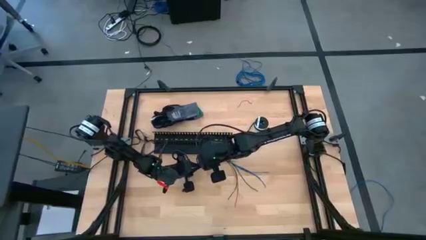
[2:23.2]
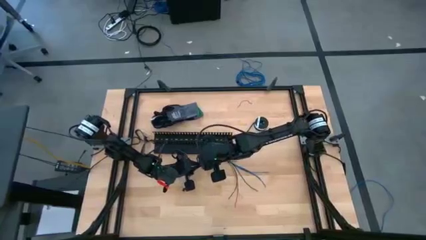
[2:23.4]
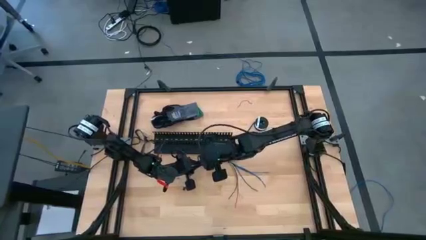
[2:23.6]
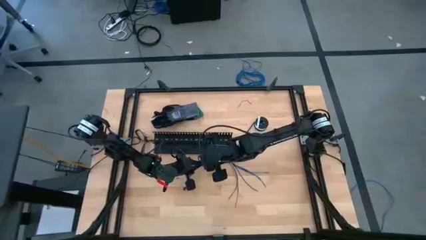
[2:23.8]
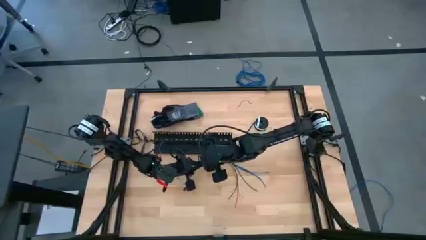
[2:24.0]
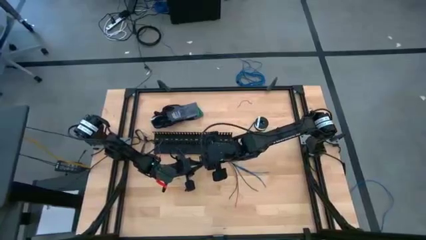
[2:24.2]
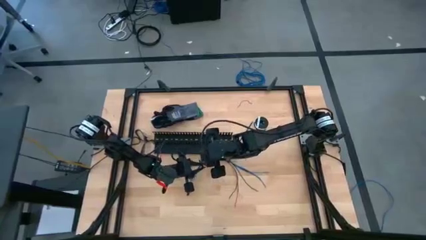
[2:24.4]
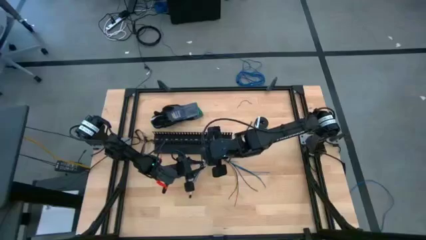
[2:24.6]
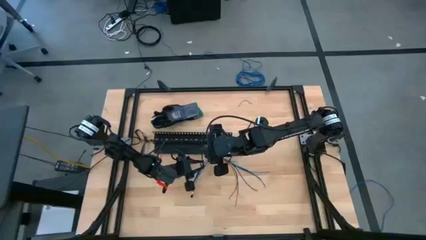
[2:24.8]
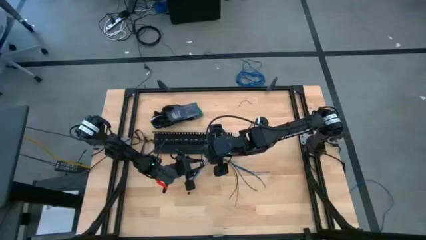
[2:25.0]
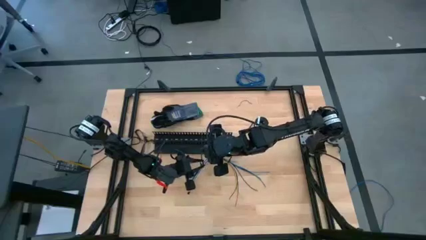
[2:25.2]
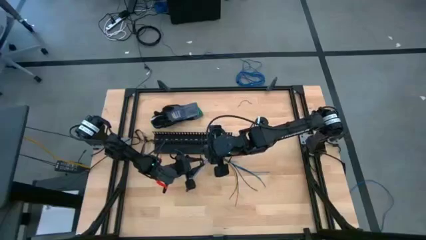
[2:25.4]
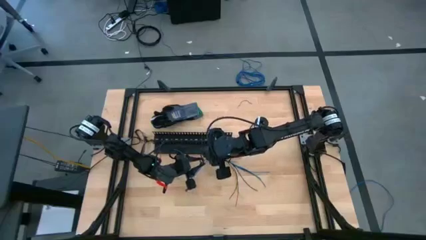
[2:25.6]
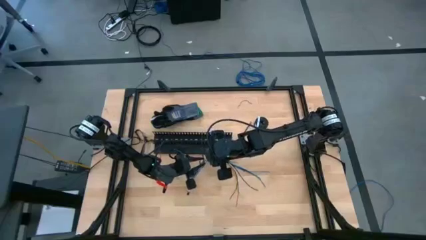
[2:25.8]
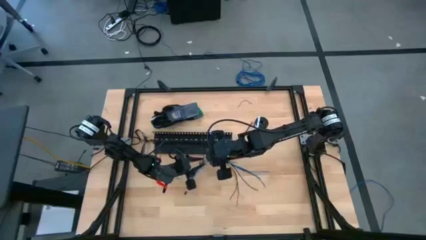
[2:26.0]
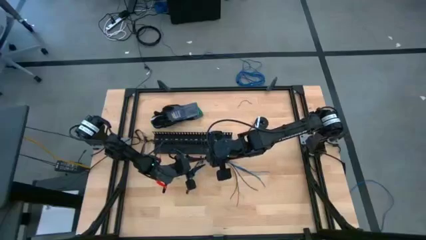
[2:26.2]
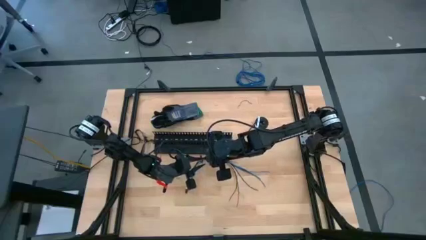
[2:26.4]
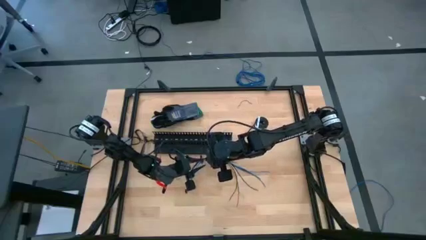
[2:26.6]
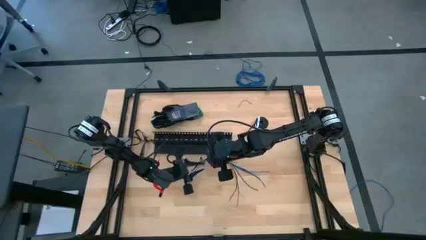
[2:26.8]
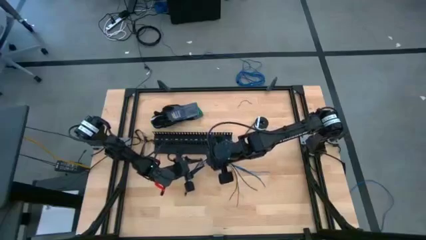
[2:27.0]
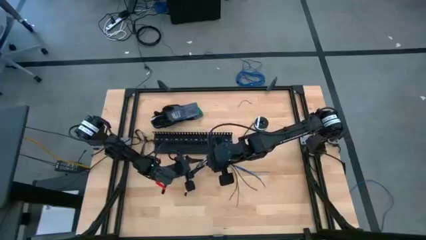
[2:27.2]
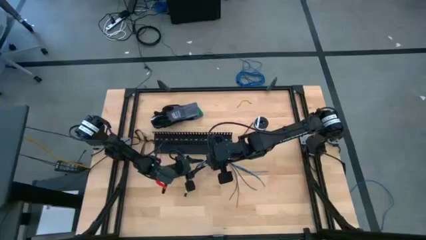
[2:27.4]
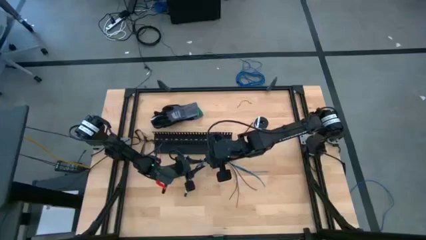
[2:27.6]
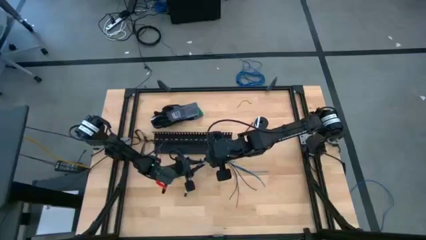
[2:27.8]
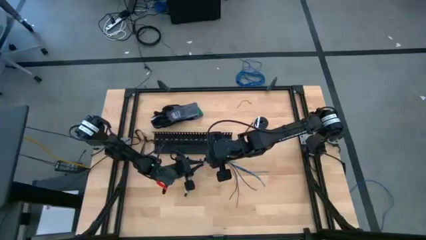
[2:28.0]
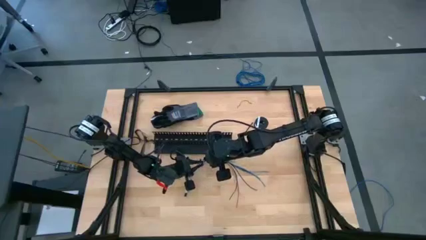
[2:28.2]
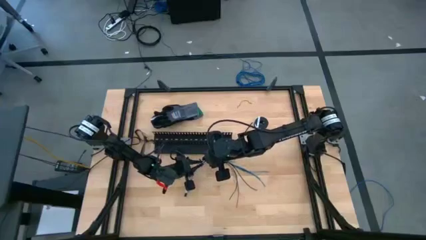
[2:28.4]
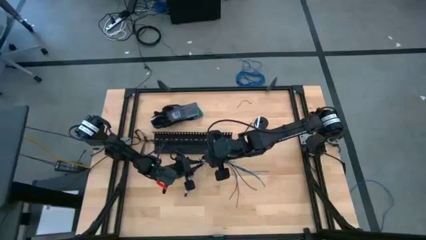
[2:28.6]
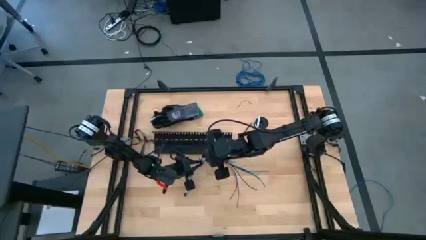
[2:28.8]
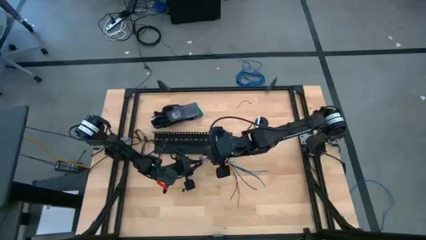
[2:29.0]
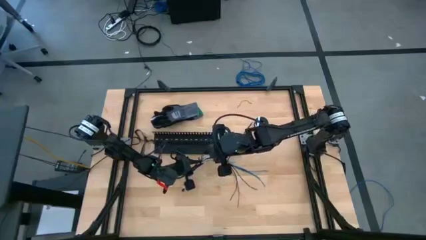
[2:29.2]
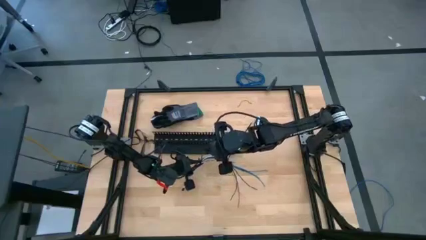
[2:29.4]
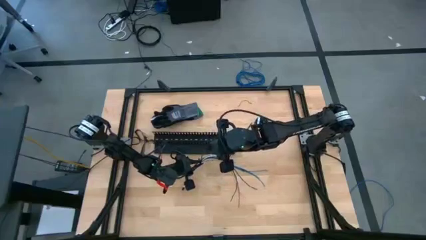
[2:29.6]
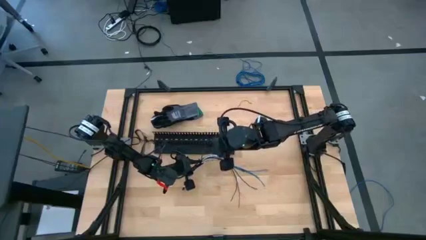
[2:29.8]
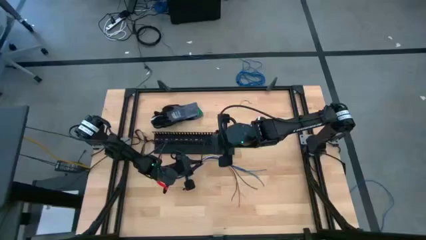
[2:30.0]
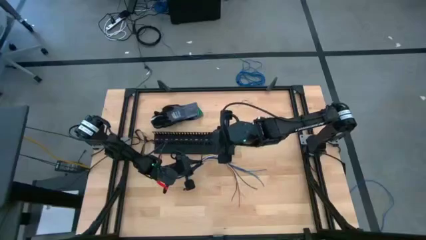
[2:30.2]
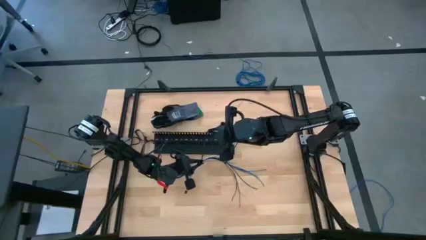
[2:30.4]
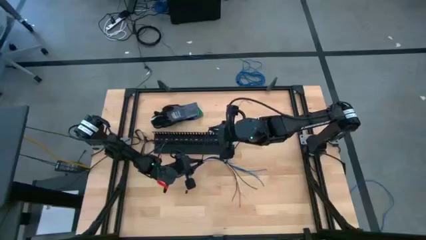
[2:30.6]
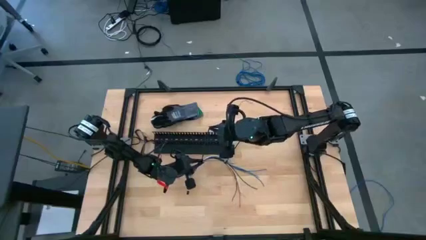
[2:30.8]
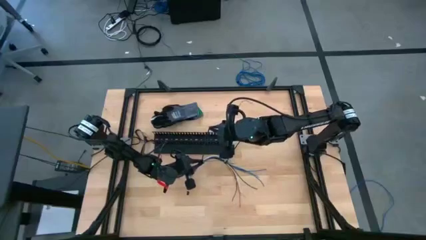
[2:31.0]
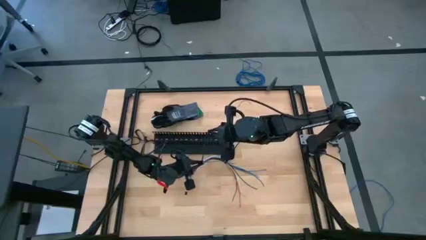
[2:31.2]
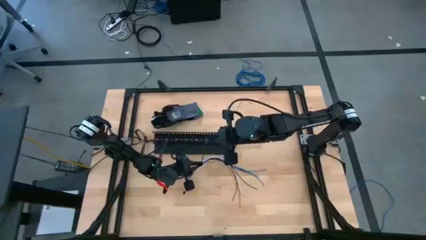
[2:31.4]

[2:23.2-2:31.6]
Task: Ziptie cables
Wrap the black zip tie on the cables

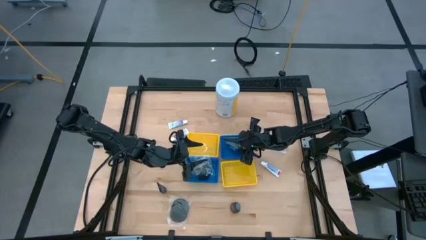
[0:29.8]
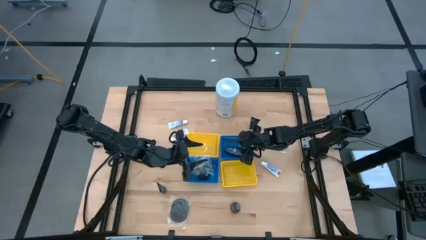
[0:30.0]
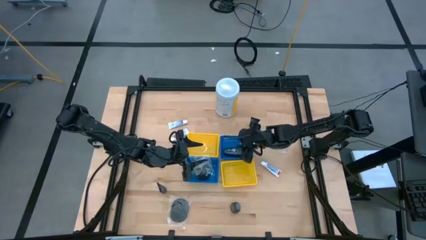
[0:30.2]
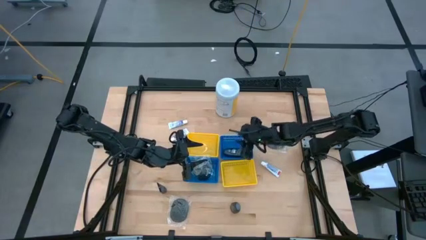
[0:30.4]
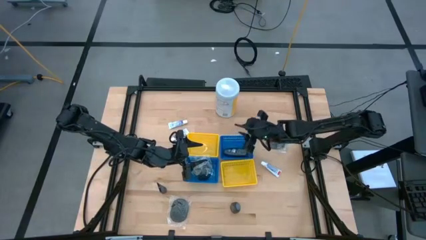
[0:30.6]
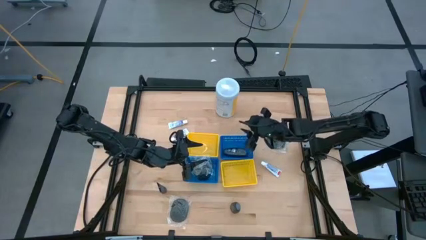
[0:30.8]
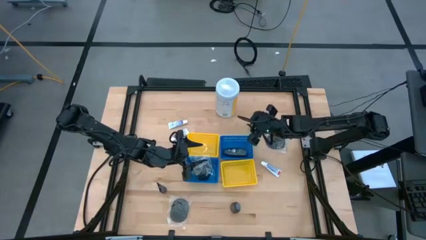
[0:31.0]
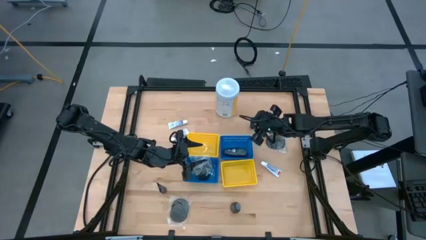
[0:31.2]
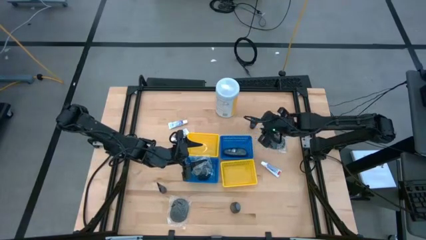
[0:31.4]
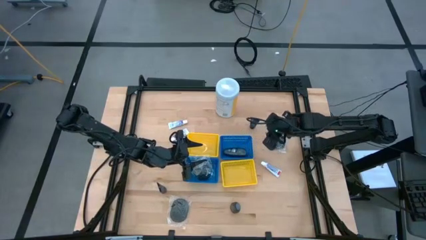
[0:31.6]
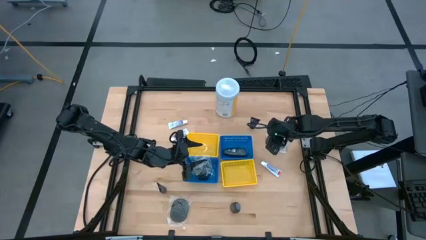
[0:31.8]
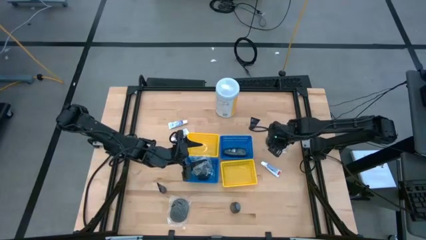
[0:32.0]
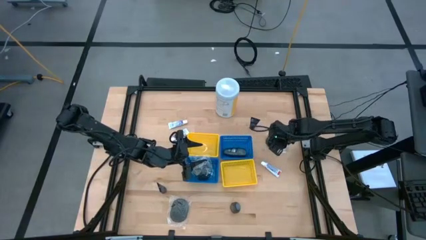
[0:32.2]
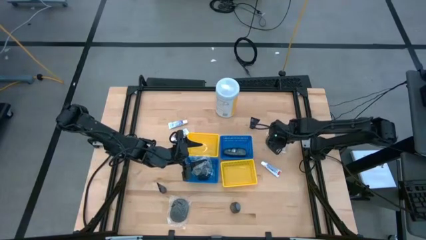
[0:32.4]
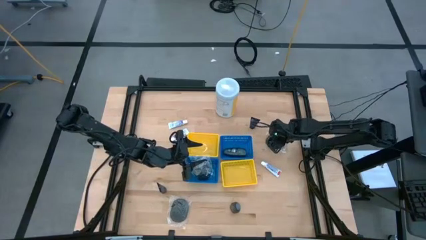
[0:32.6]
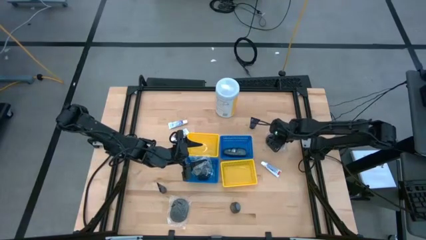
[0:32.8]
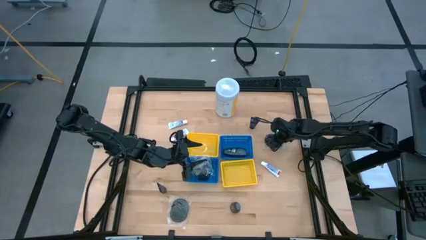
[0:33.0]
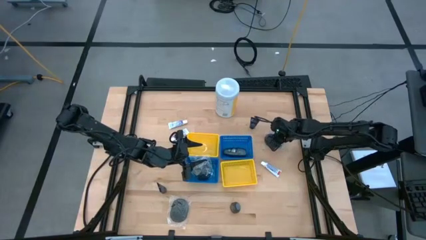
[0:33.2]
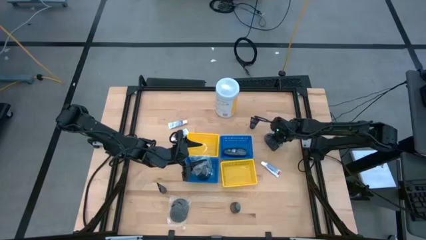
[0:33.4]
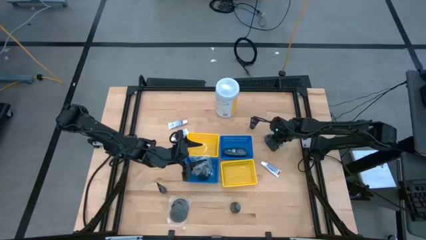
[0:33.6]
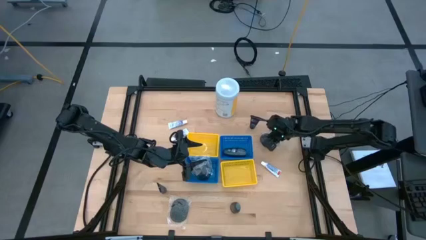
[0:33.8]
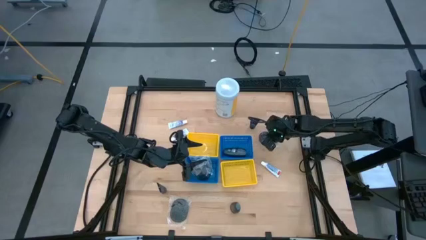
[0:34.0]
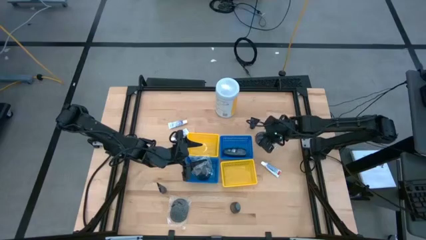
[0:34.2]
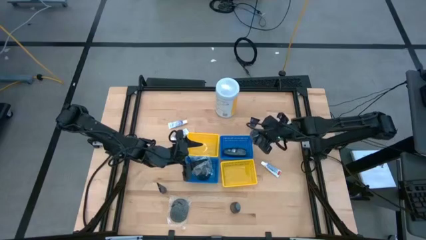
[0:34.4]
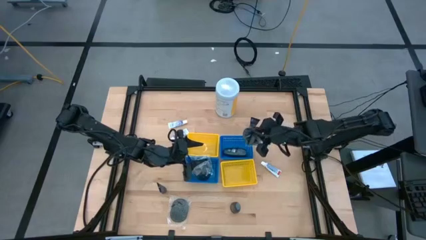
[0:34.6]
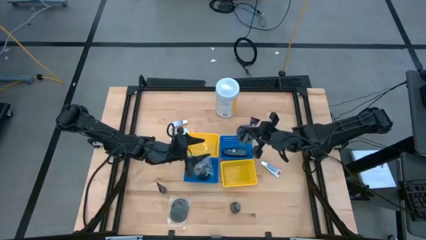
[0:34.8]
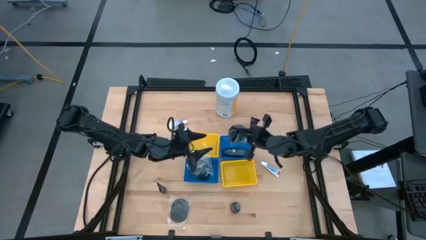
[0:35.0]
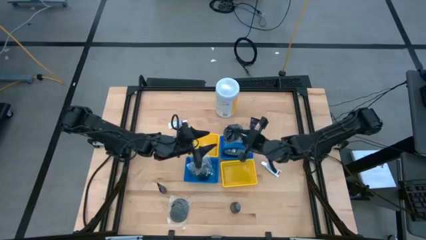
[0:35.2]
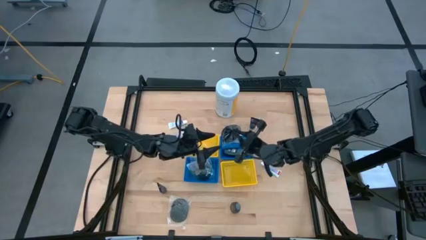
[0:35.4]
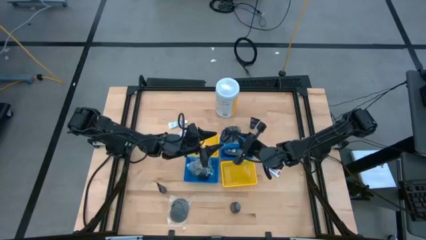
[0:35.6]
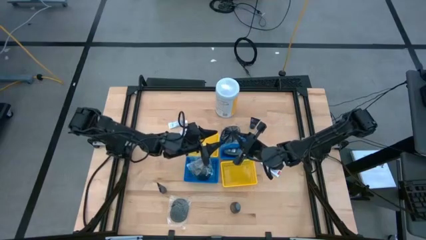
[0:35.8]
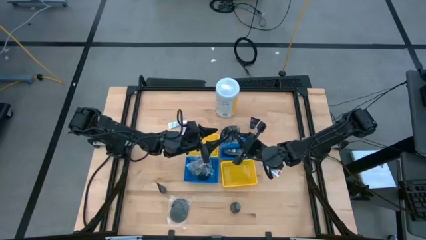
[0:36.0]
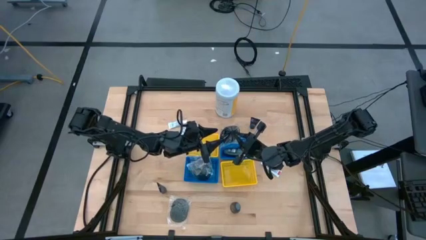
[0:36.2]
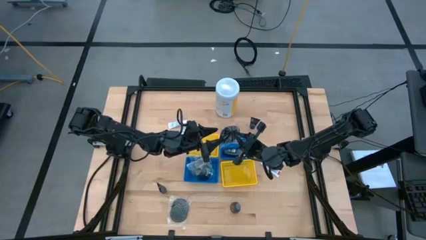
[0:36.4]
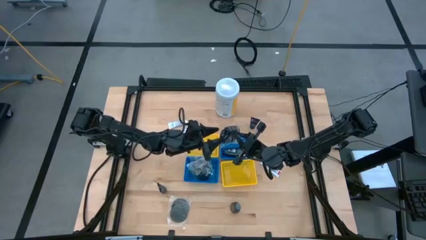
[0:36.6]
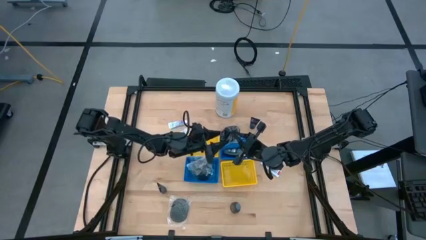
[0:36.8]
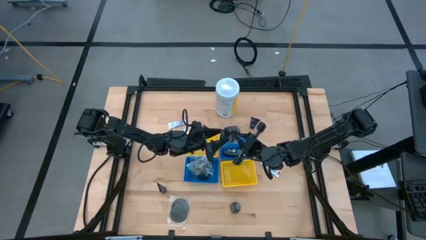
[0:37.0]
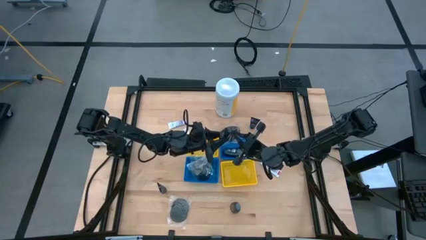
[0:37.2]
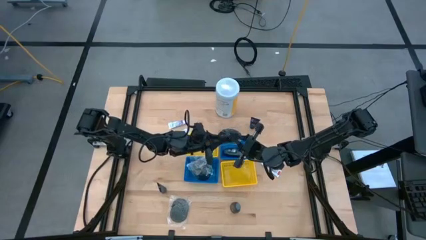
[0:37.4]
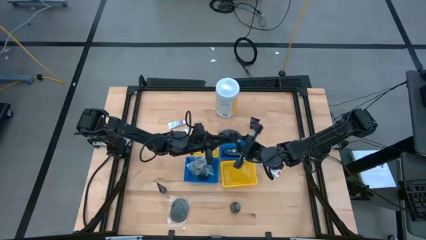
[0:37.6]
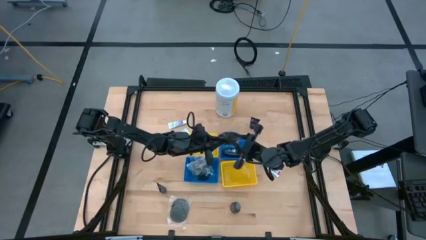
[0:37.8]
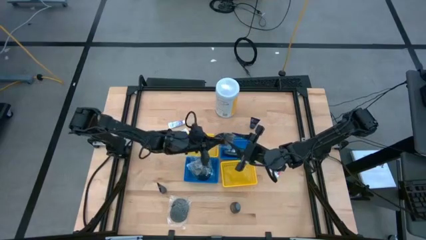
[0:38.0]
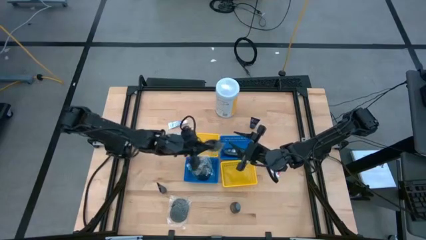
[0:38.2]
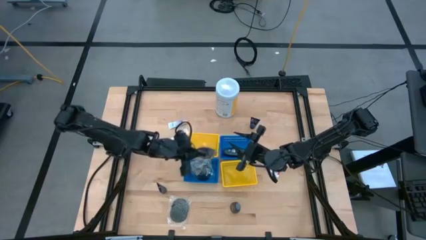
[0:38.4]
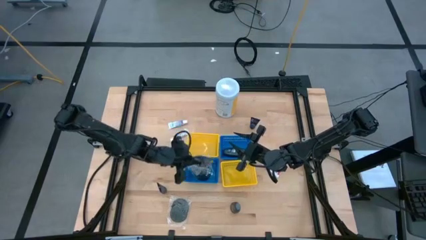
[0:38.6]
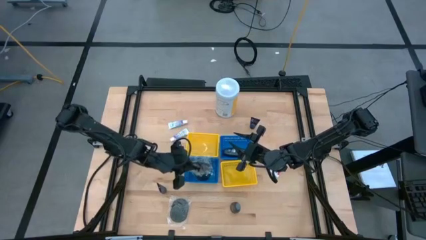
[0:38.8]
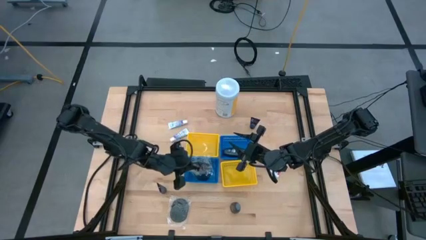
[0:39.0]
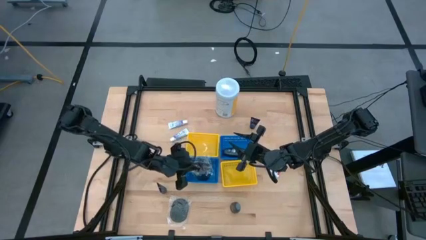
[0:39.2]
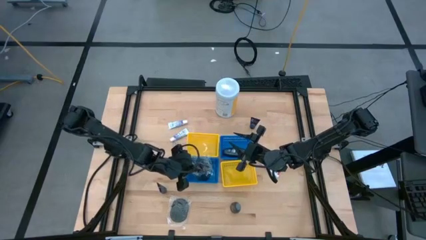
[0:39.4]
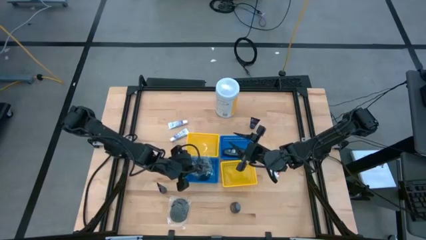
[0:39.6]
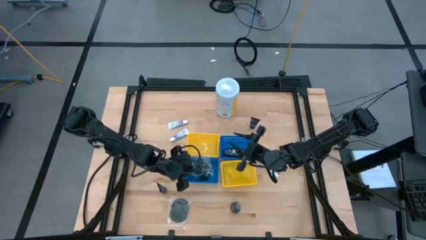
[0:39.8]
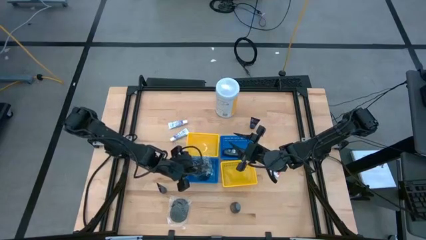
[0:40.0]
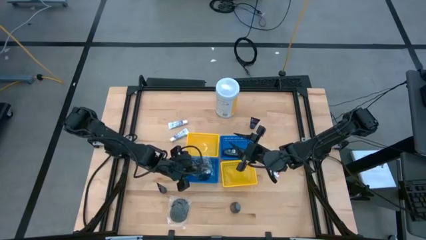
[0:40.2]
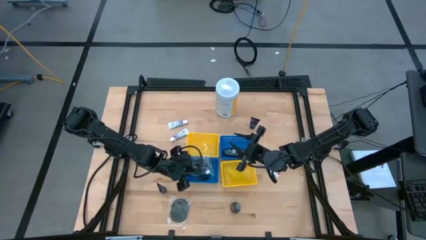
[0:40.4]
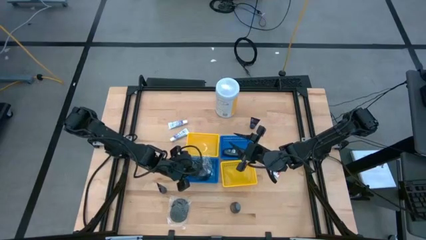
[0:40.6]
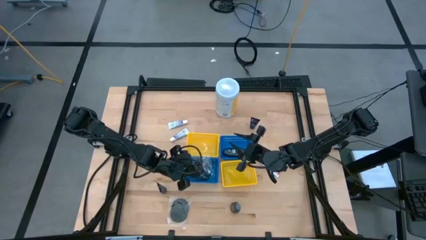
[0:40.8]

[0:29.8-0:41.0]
Task: Pick & Place Travel size toiletries
Put the black hairbrush into the bottom blue bin
